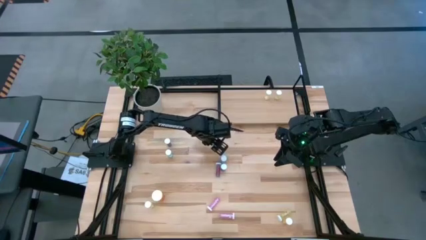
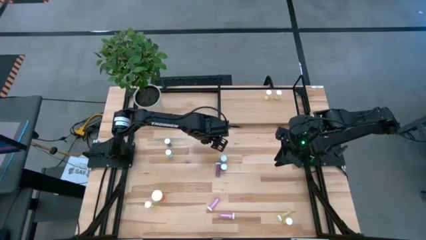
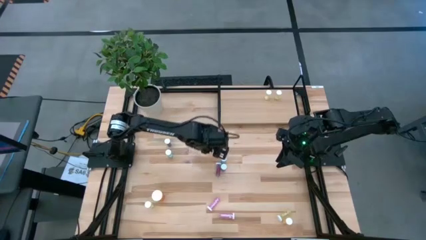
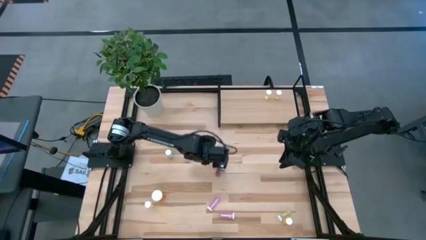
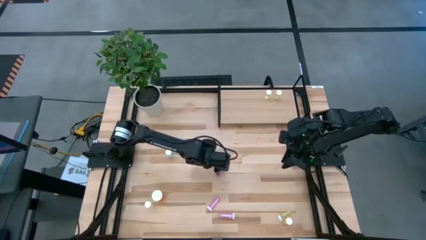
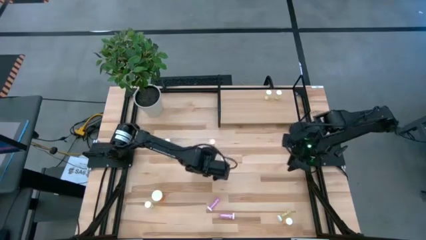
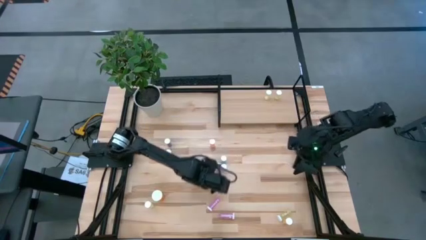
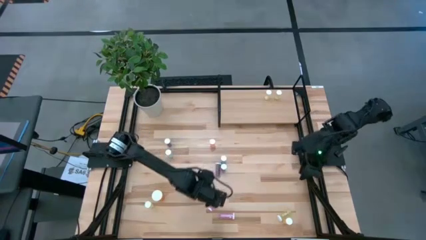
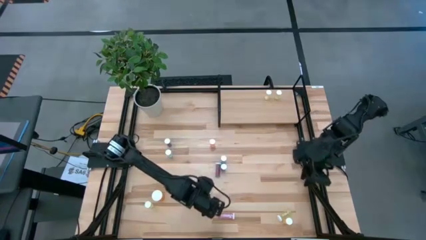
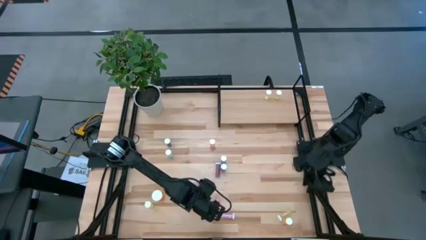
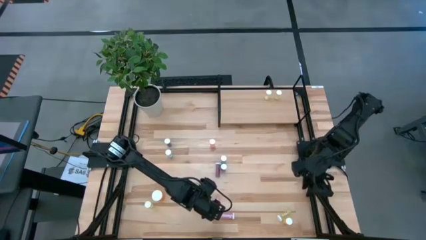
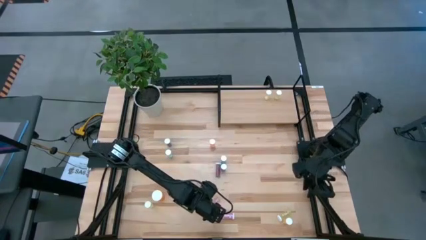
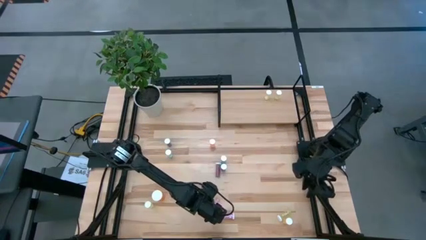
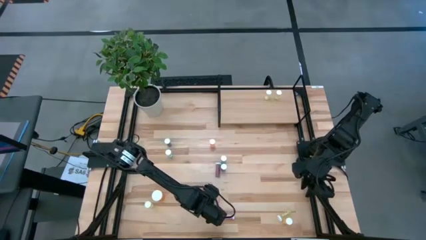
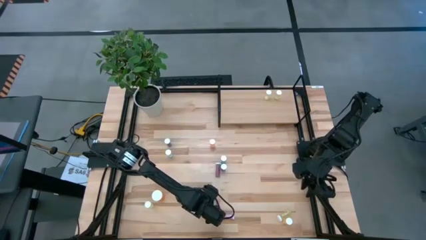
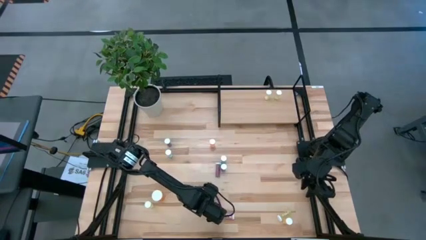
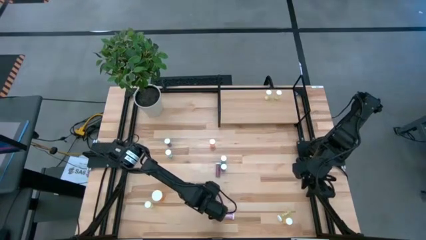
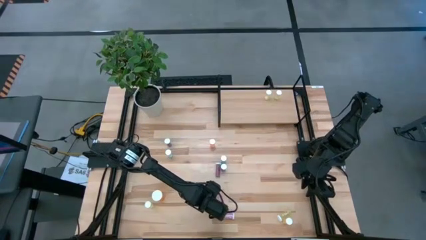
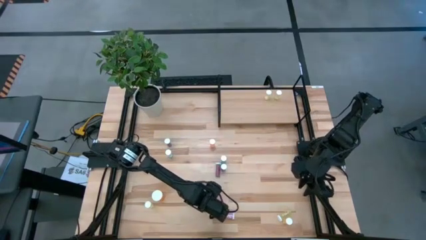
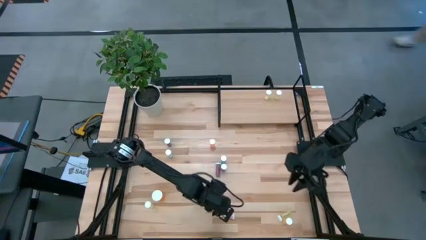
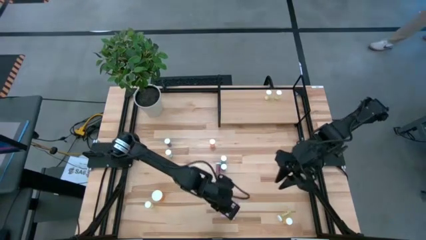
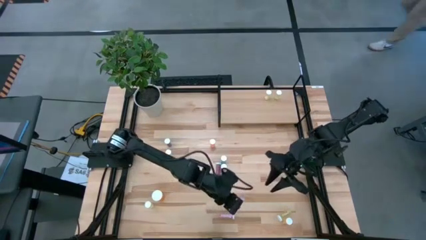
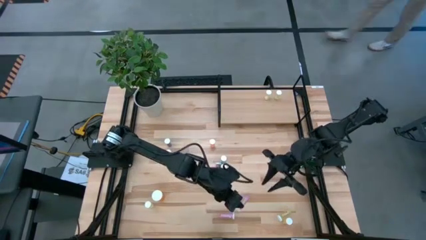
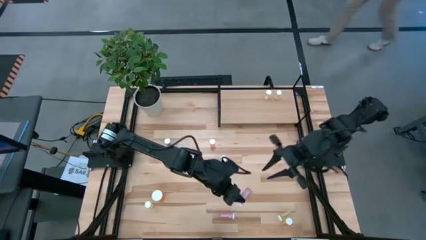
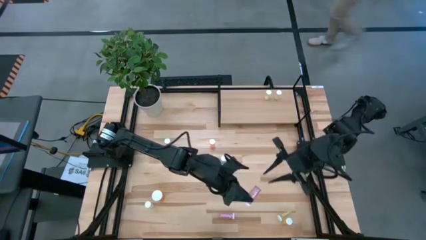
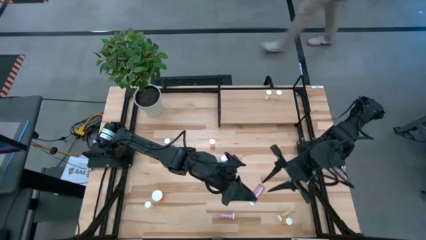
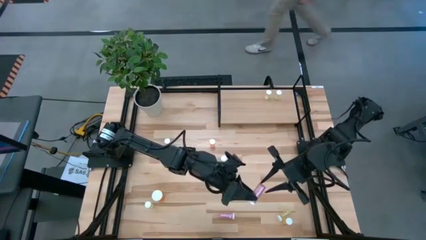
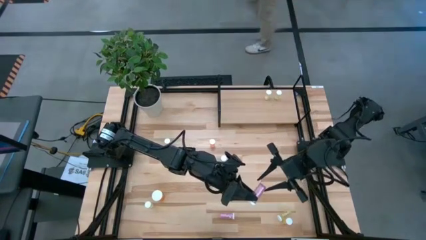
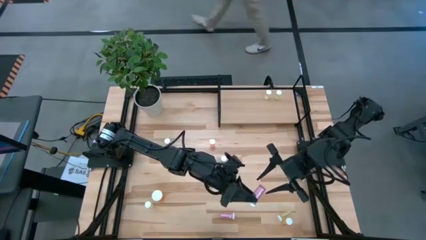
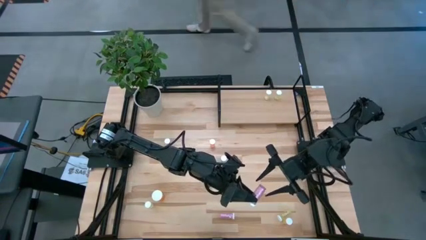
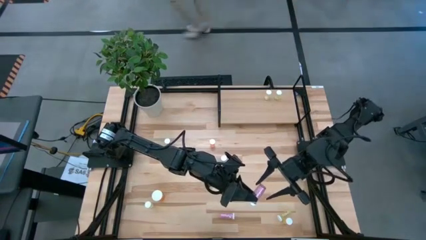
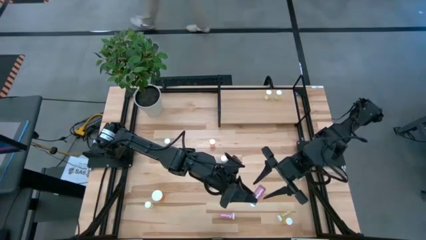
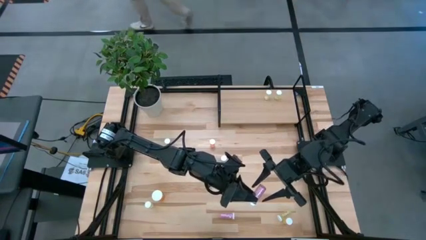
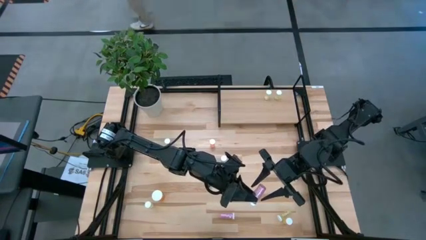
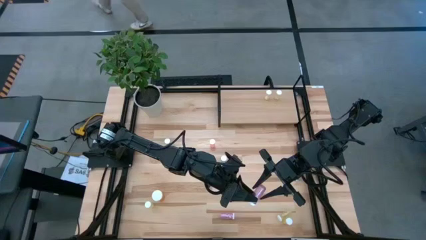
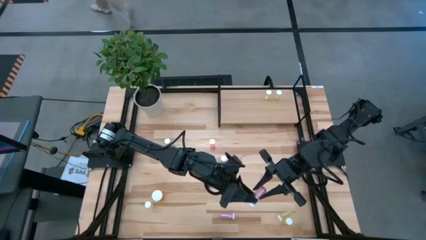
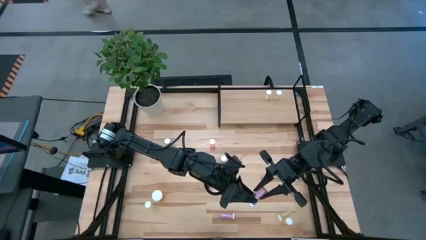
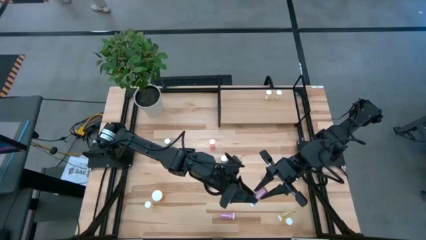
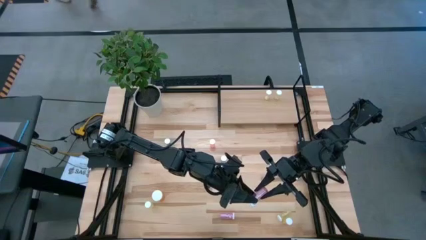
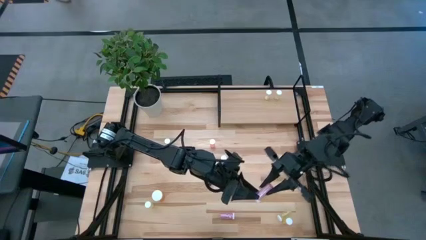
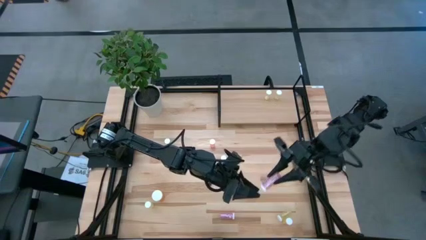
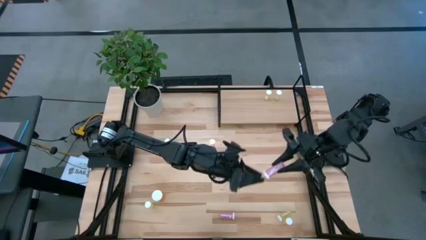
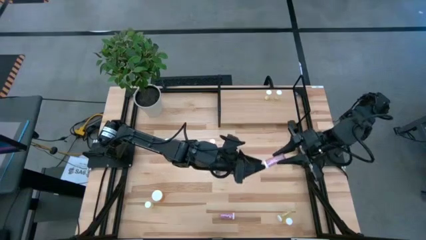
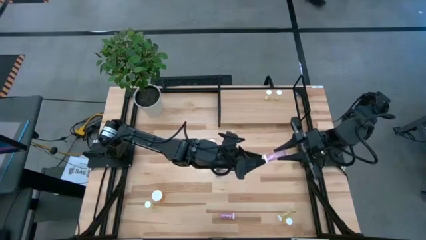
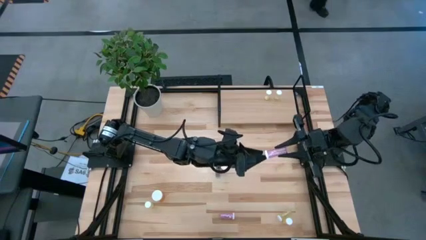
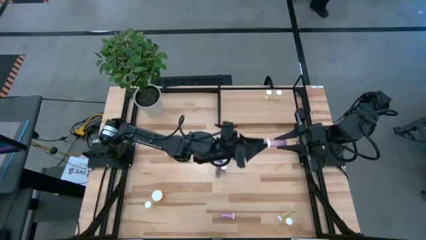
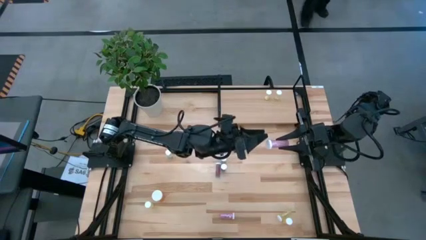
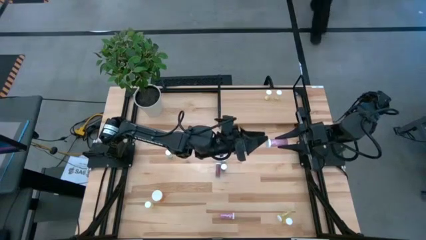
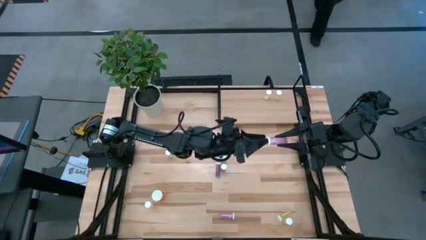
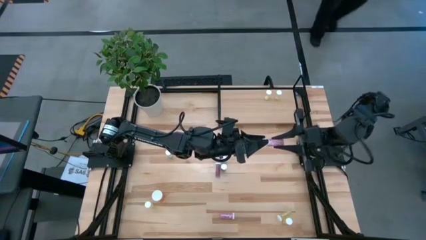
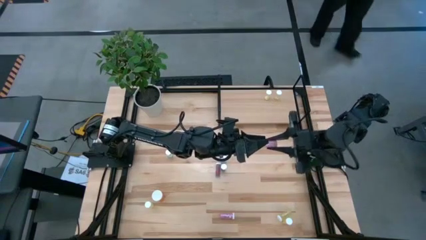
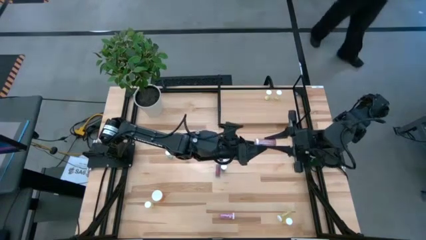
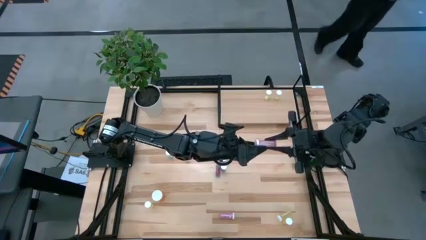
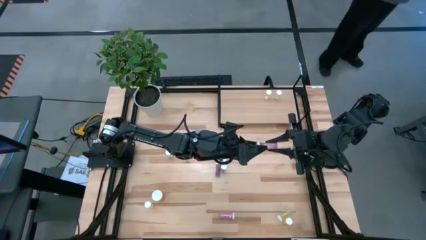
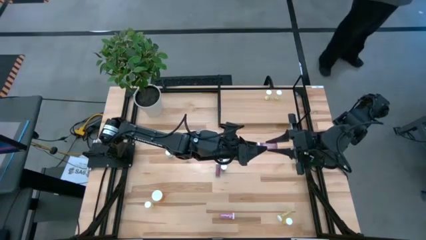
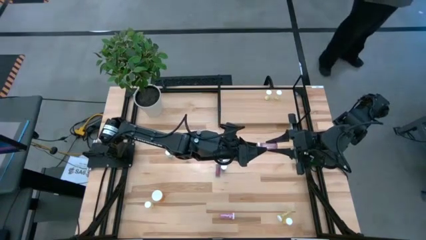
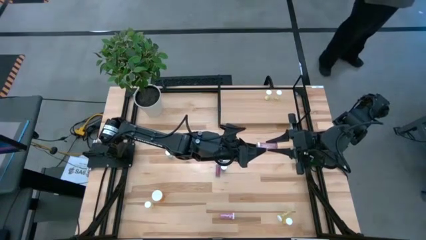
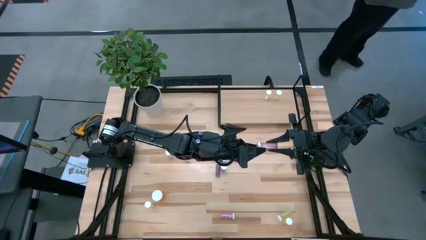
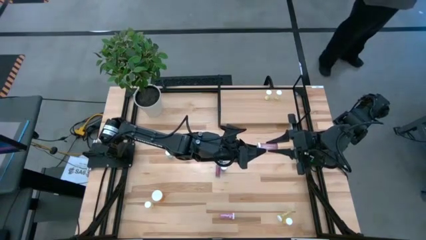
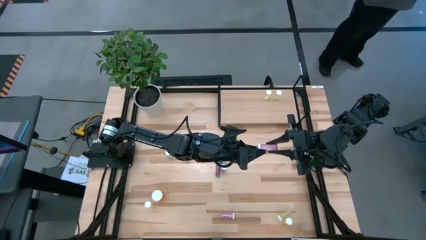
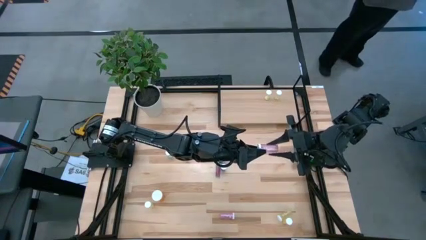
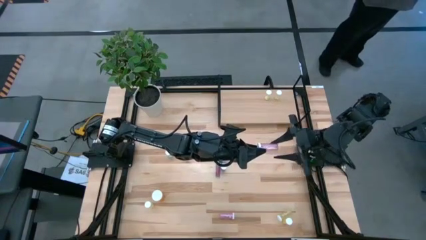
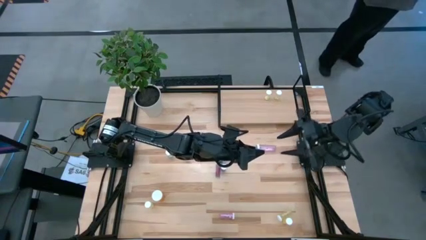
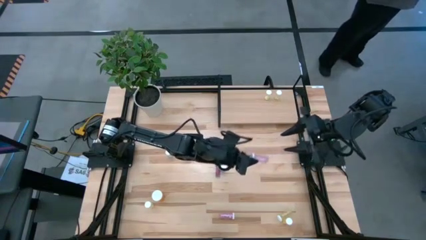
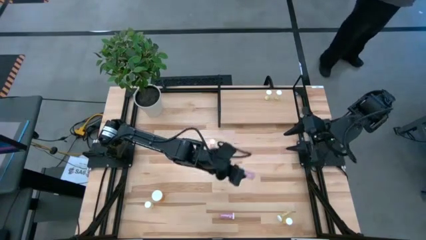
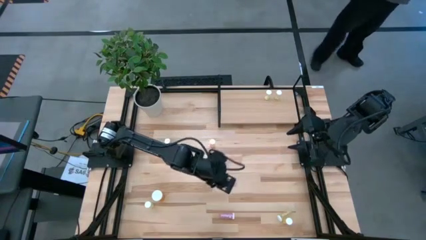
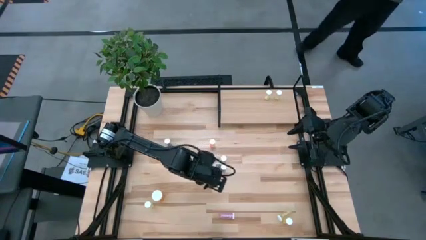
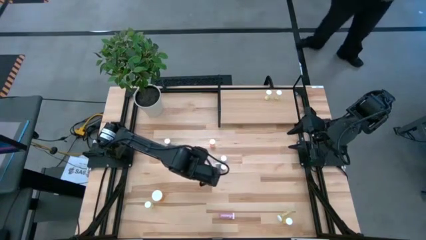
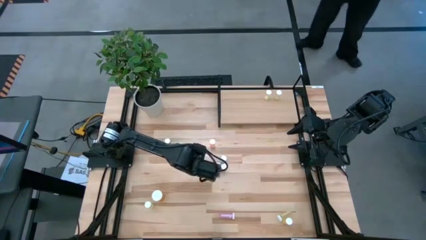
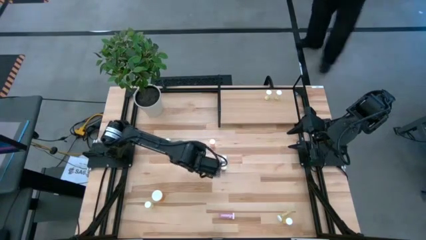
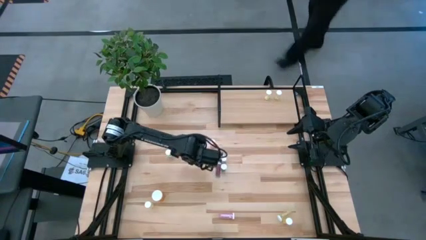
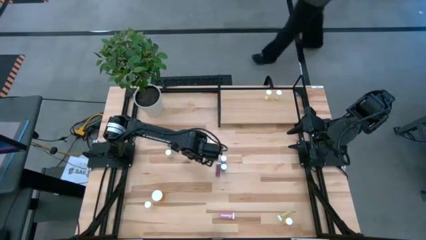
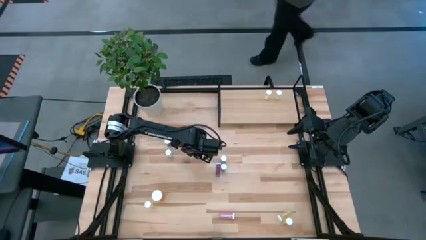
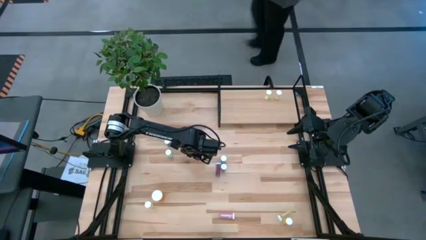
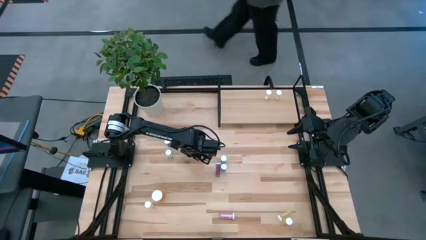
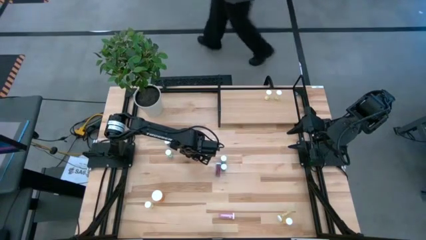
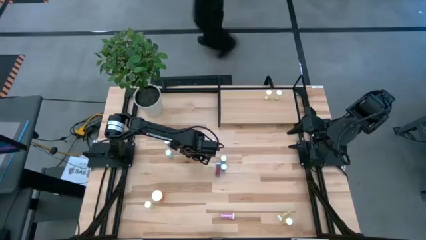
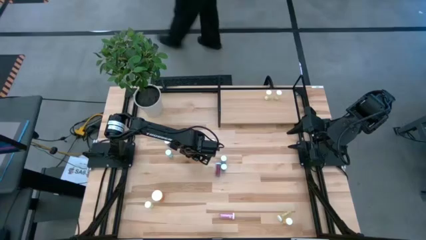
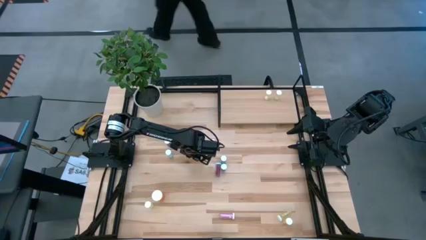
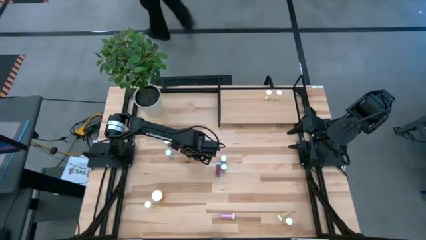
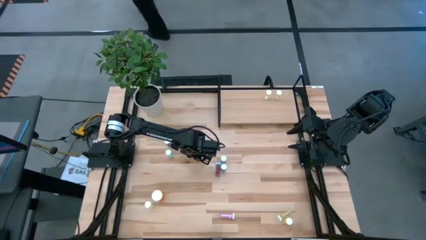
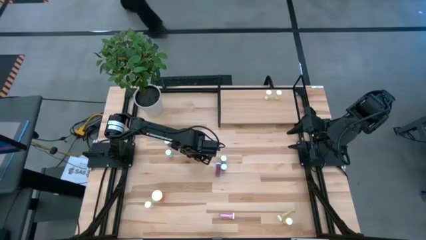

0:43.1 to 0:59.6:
Task: Pick and place medicine bottles onto shelf by color
Move the top pink pill bottle to the center of the table
